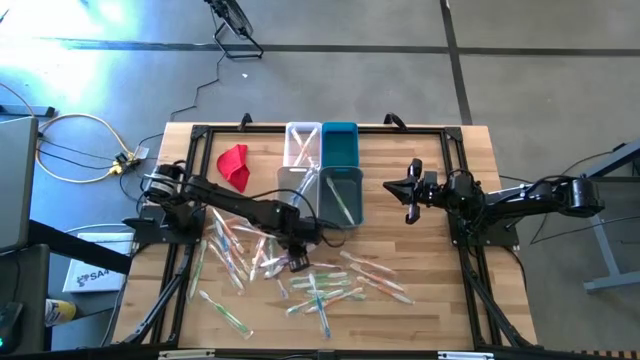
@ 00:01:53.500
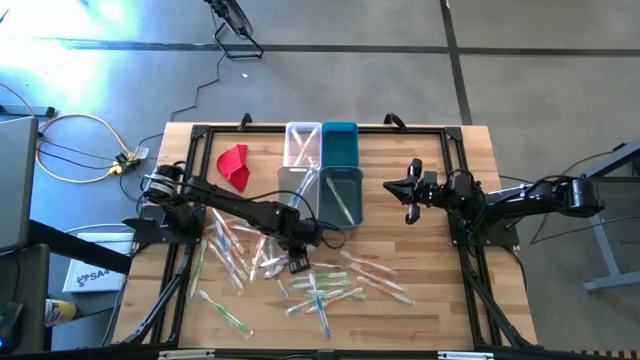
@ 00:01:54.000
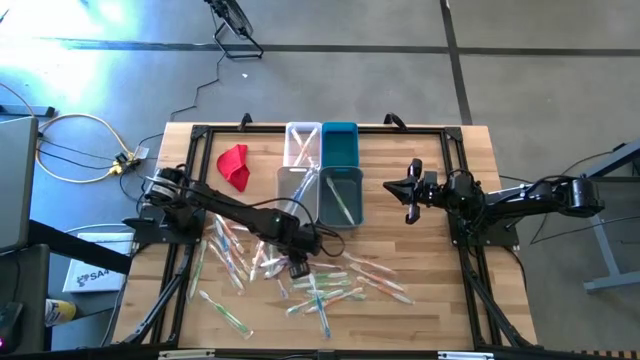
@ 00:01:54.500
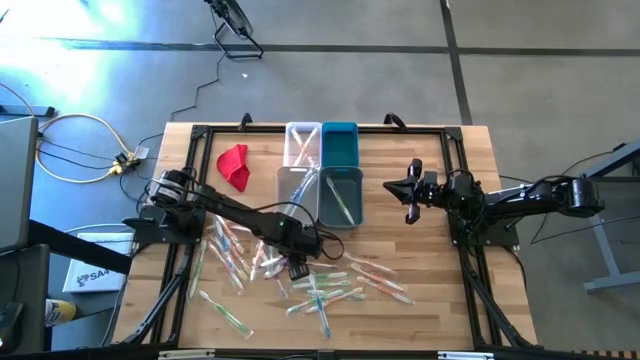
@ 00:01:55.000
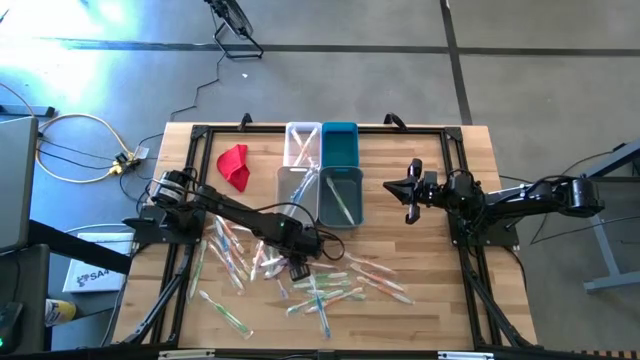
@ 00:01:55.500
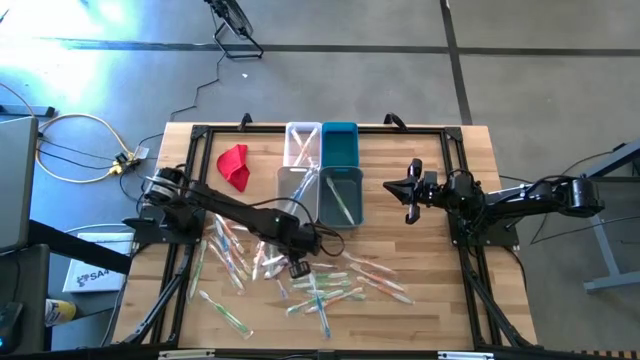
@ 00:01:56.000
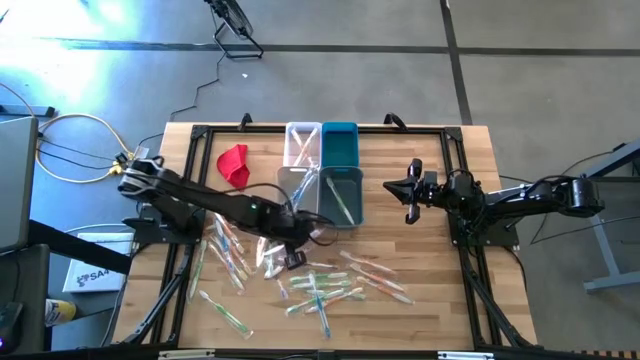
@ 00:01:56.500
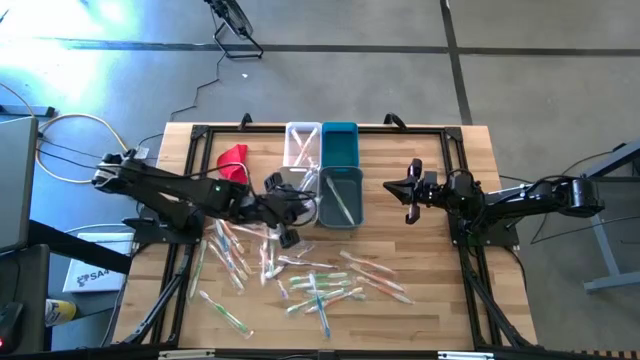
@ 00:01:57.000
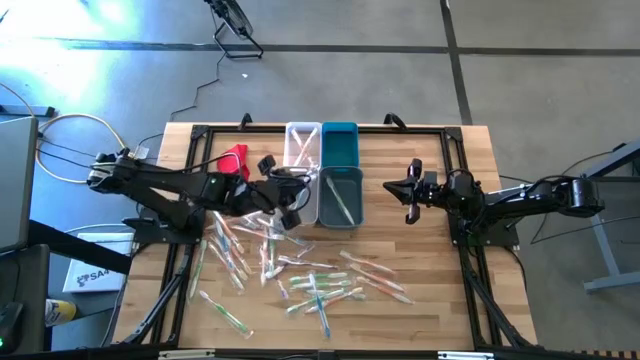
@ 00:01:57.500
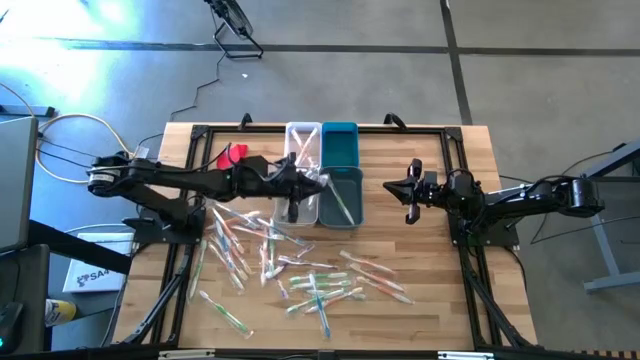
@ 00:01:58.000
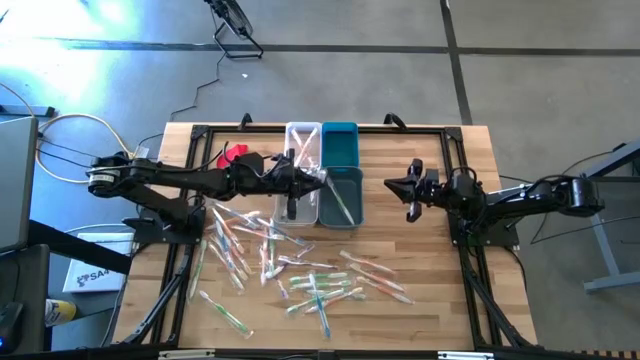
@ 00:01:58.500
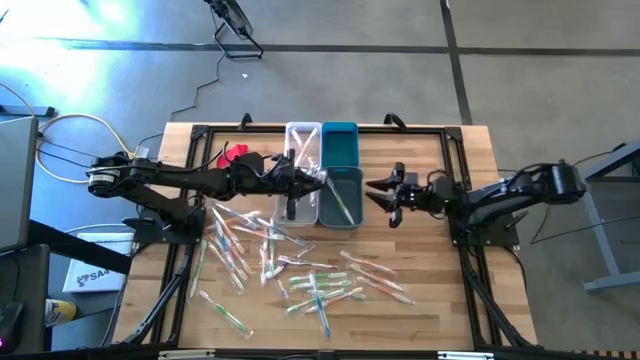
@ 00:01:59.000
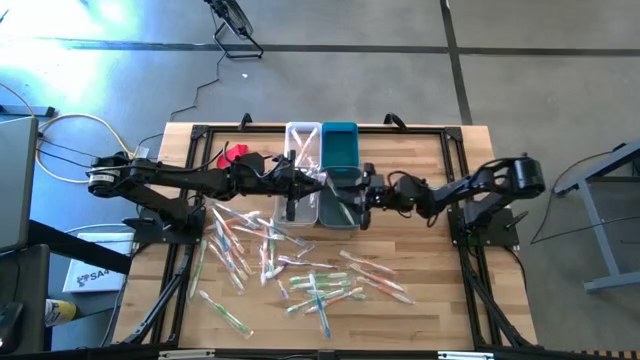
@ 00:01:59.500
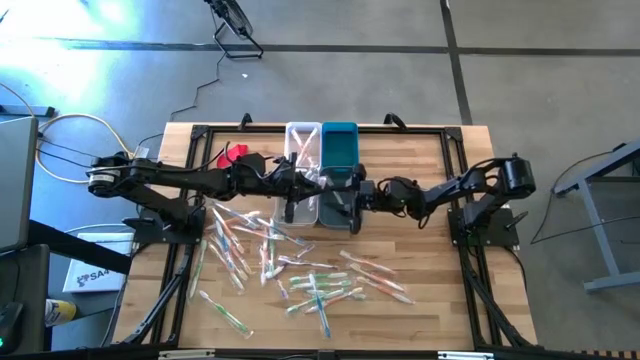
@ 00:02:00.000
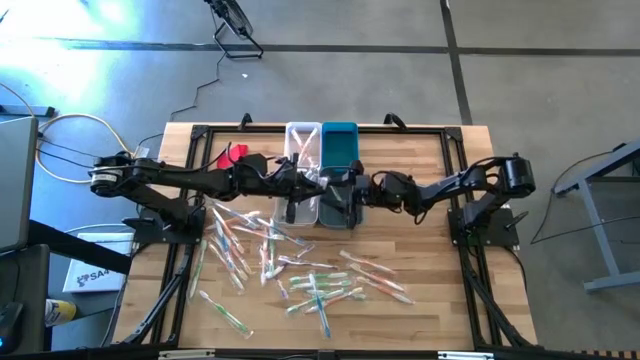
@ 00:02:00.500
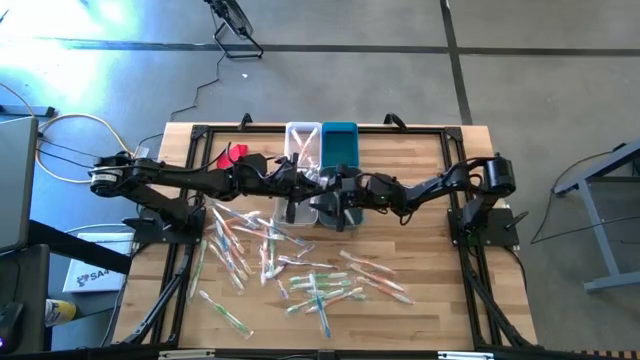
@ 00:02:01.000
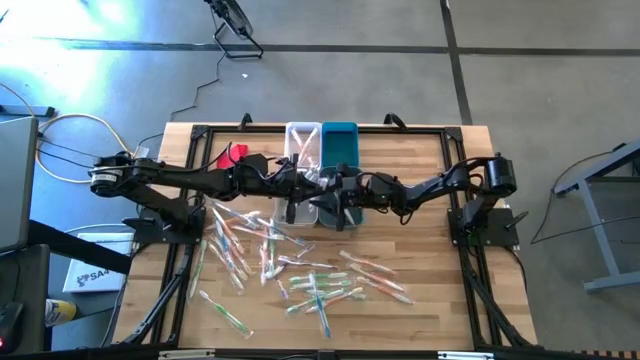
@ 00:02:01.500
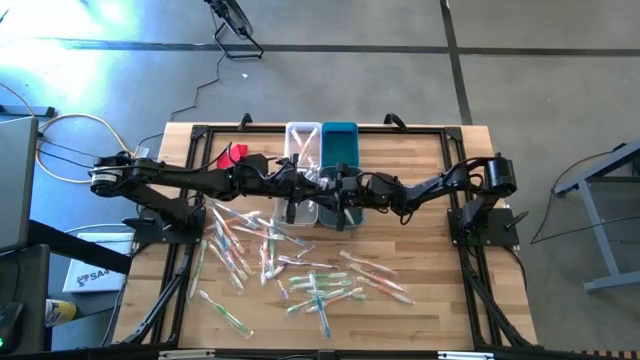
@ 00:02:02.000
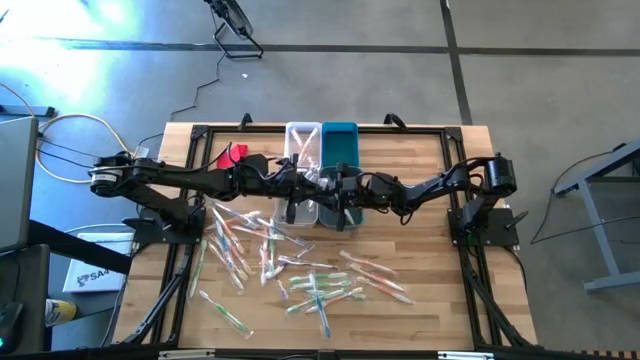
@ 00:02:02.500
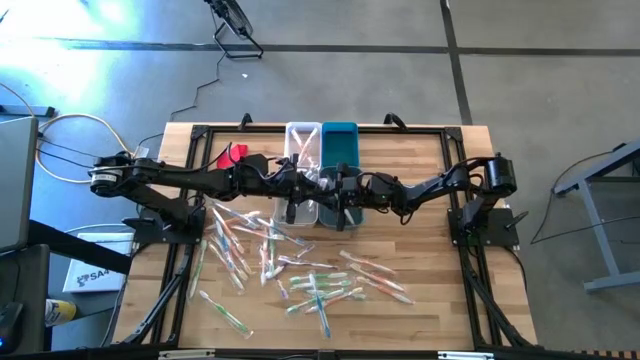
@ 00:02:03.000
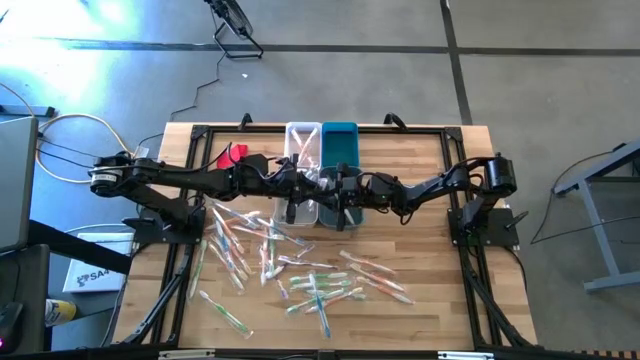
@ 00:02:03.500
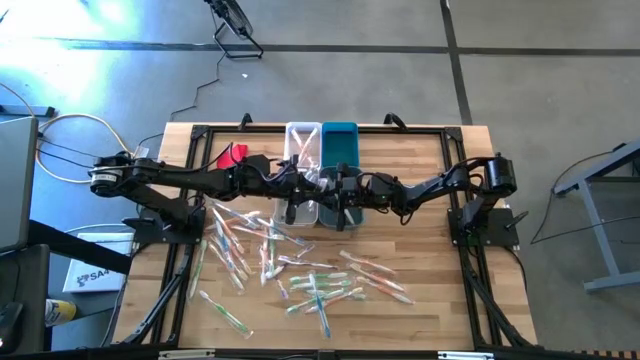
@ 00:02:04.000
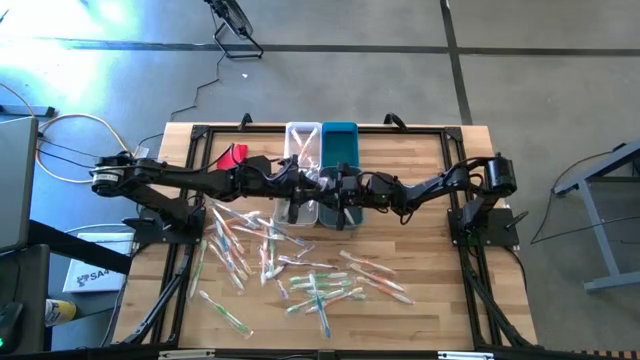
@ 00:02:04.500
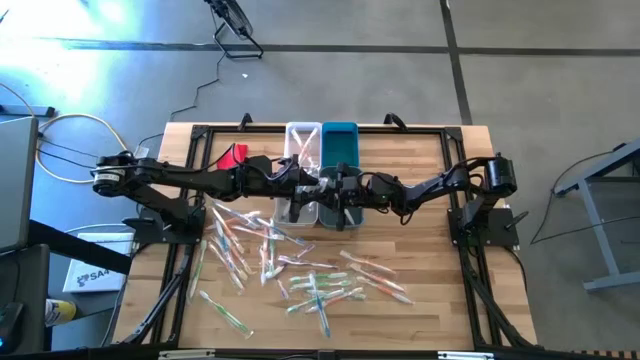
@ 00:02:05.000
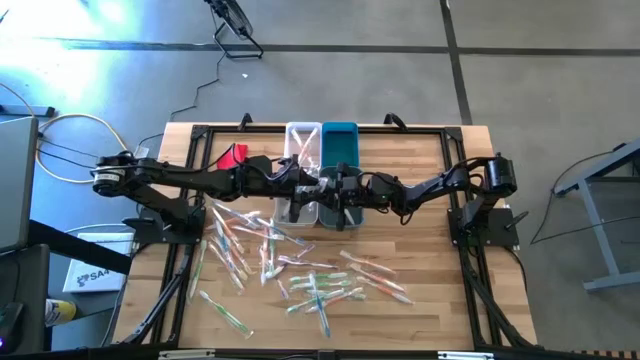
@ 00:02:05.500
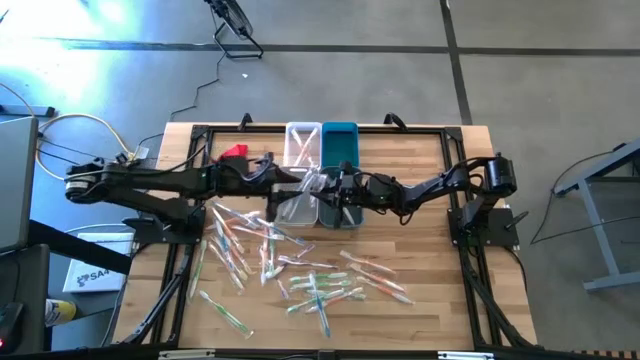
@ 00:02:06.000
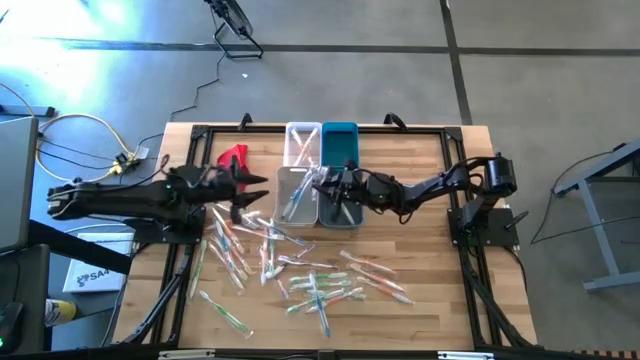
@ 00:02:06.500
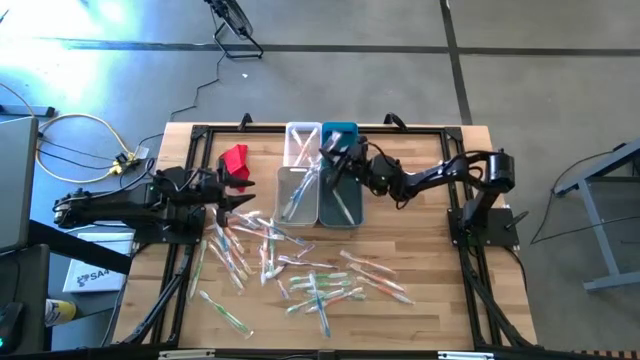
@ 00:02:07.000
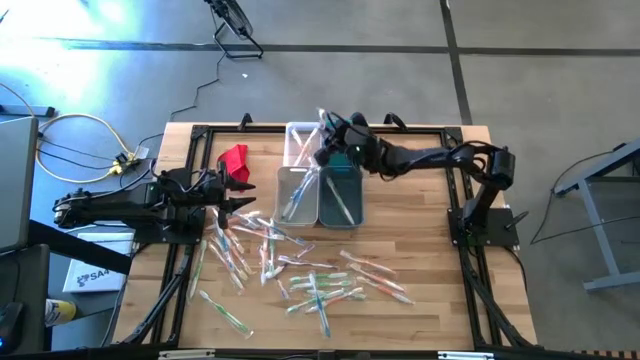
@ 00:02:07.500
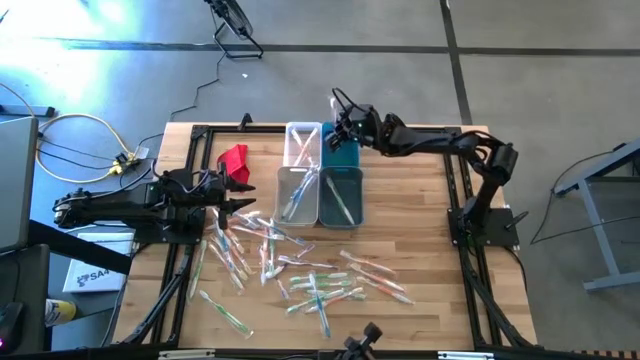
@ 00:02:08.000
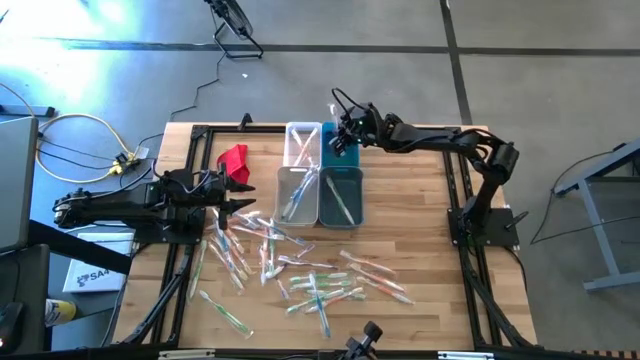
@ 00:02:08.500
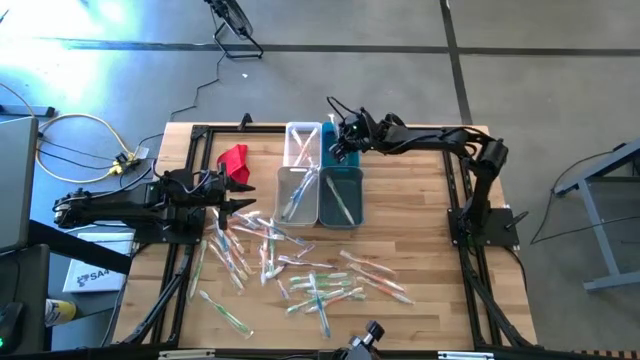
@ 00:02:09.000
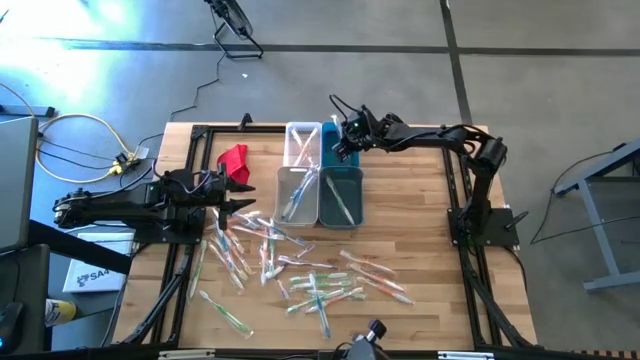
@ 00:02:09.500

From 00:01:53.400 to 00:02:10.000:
Task: Pick & Place Toothbrushes
Put the violet toothbrush into the light blue bin

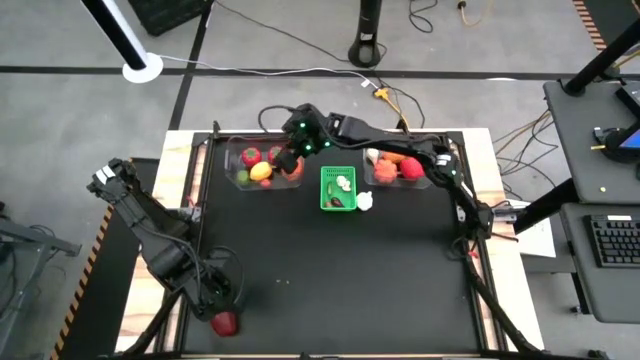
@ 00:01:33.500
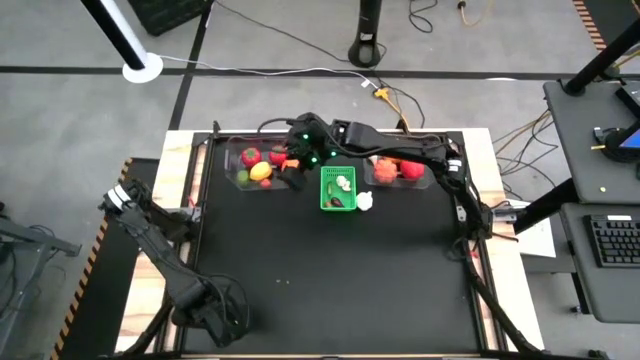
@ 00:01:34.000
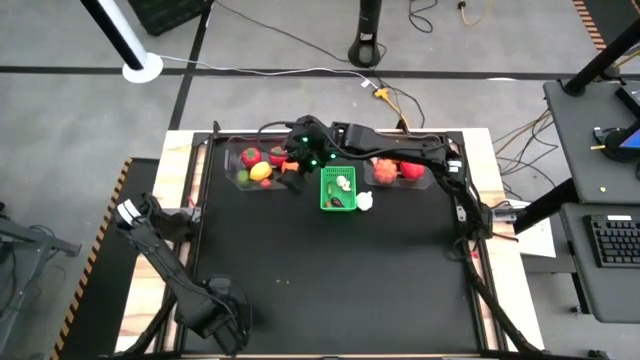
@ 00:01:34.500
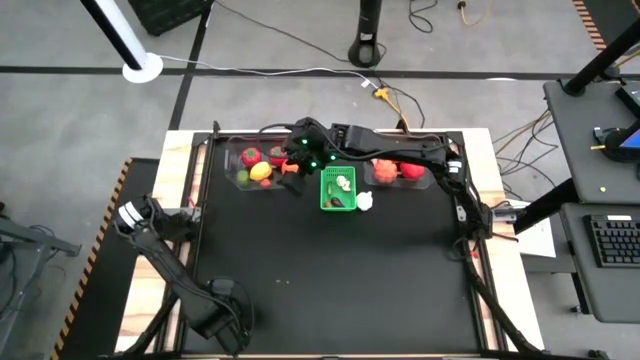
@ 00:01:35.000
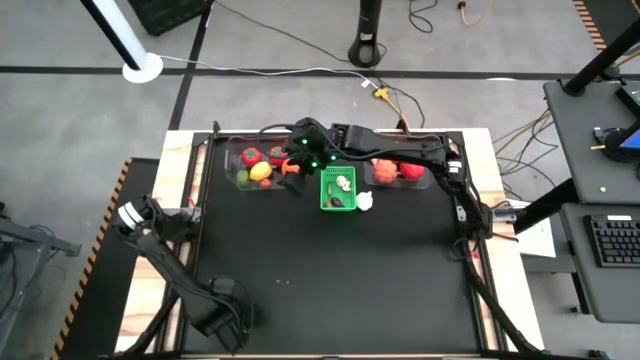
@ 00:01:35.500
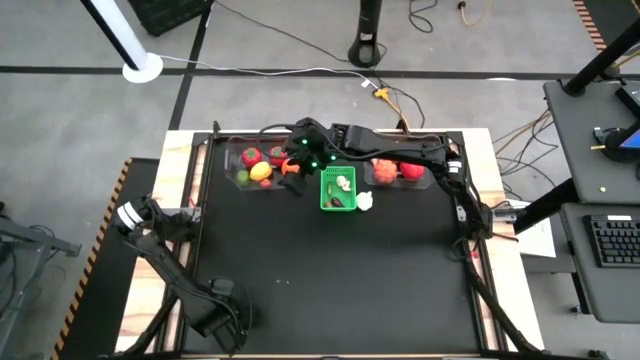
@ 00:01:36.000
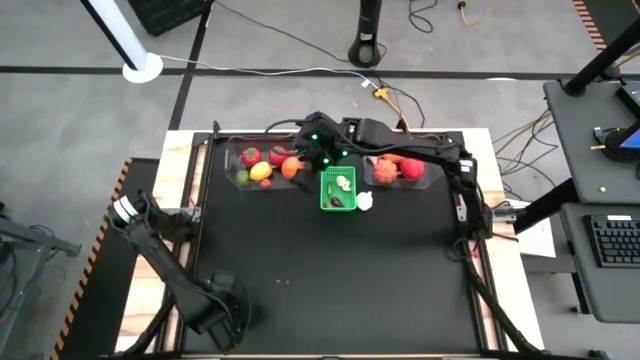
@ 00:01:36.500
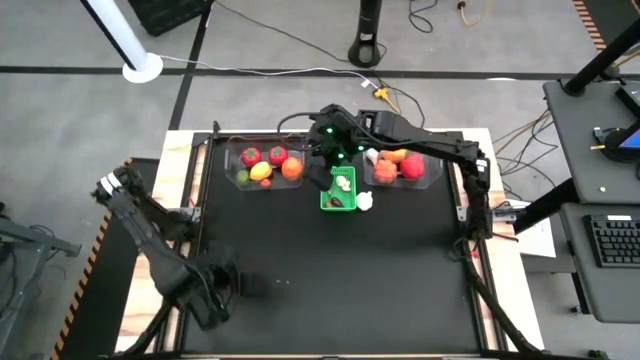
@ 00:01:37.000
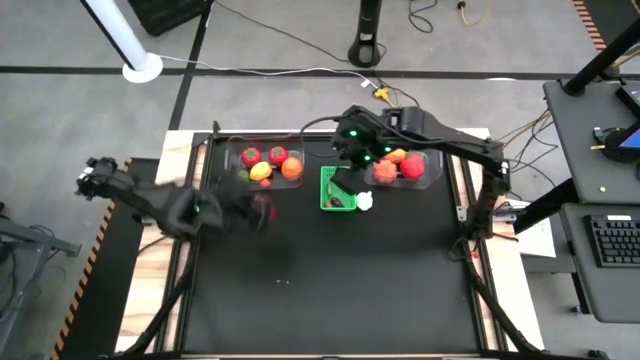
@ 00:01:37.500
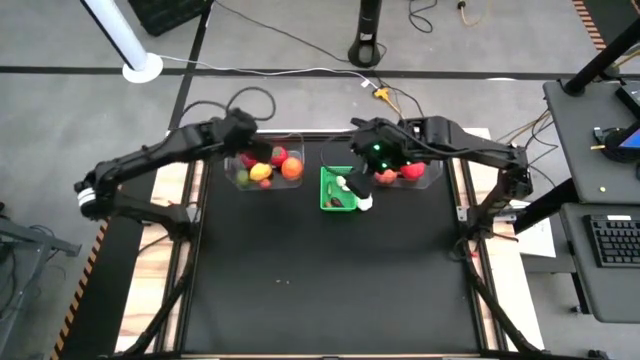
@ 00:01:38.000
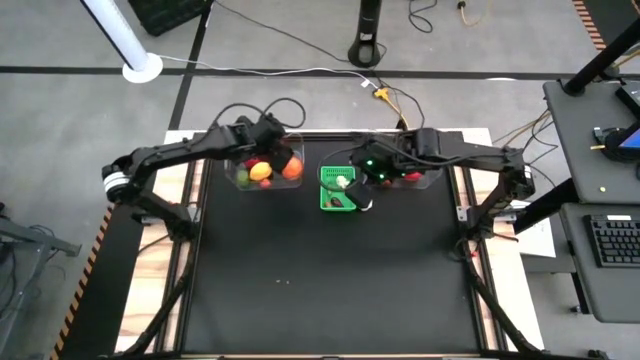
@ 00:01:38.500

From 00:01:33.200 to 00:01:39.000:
Task: Sort produce into baskets
Put the apple into the left transparent bin
